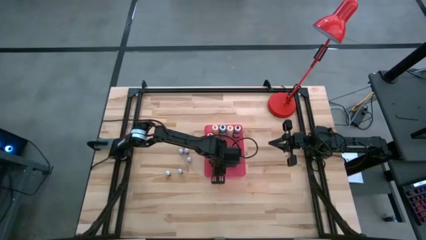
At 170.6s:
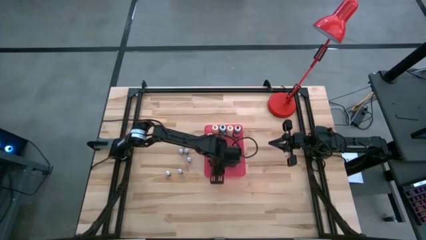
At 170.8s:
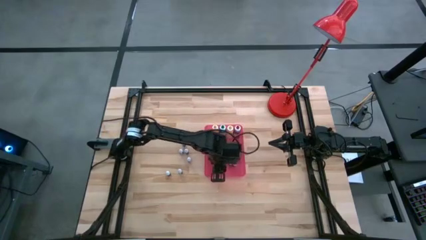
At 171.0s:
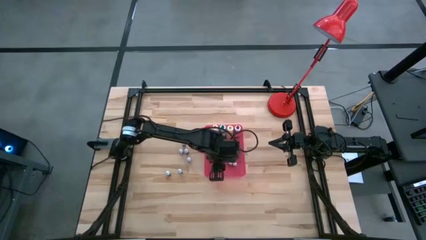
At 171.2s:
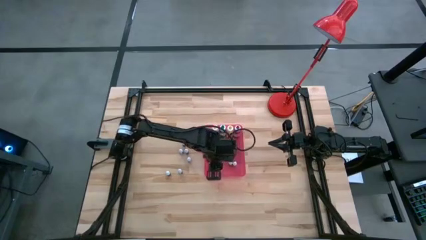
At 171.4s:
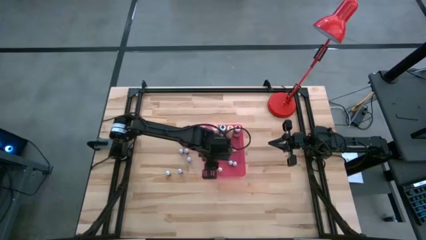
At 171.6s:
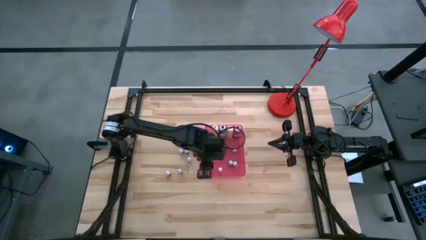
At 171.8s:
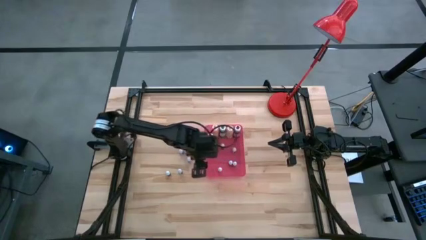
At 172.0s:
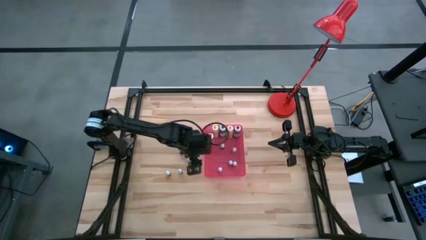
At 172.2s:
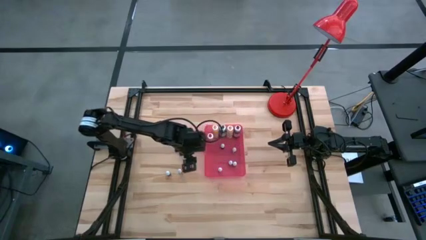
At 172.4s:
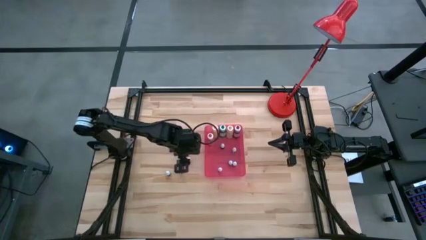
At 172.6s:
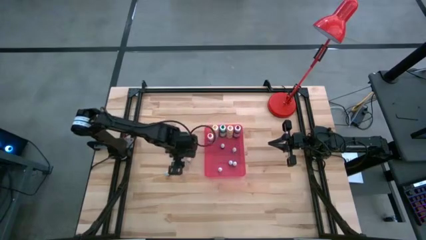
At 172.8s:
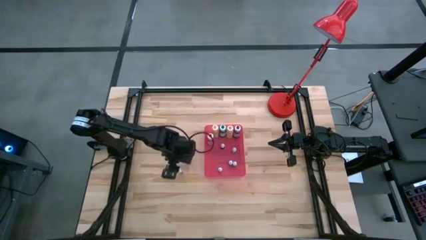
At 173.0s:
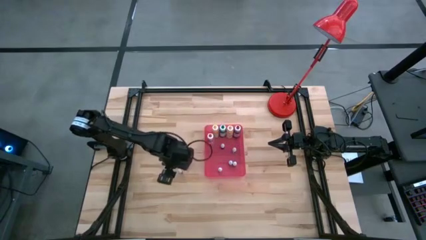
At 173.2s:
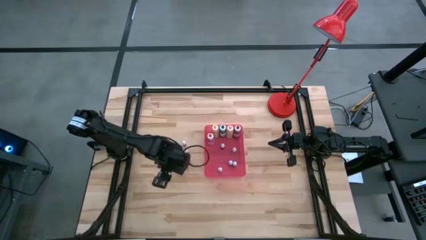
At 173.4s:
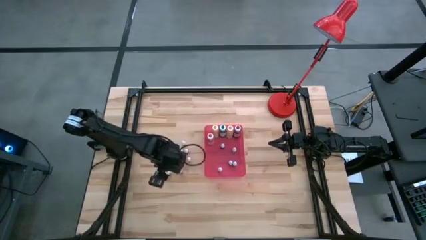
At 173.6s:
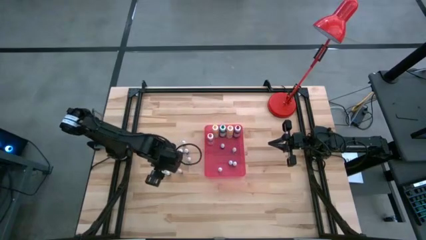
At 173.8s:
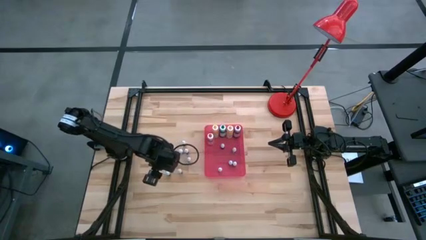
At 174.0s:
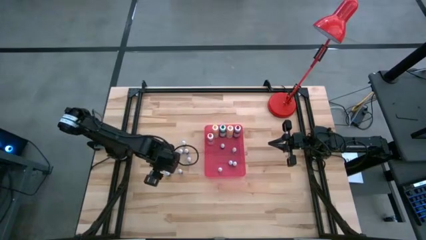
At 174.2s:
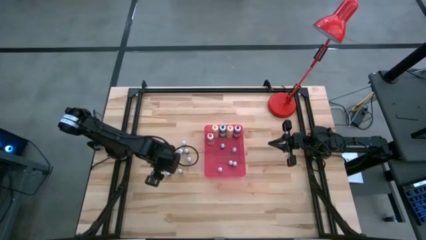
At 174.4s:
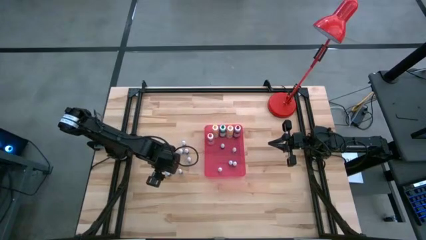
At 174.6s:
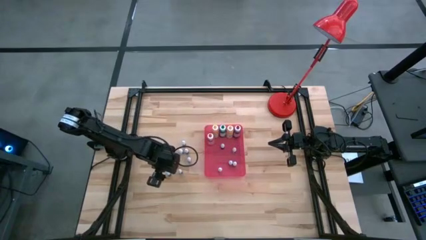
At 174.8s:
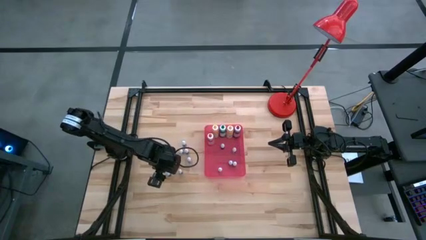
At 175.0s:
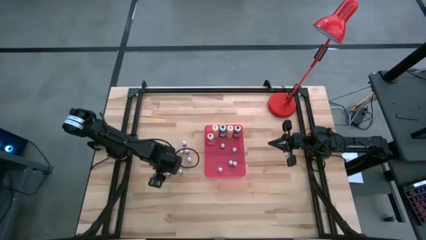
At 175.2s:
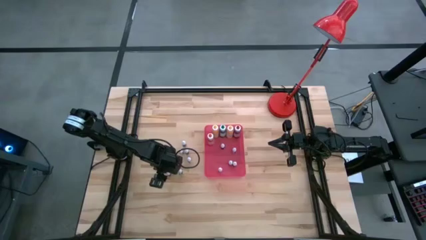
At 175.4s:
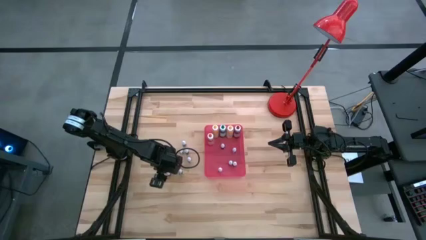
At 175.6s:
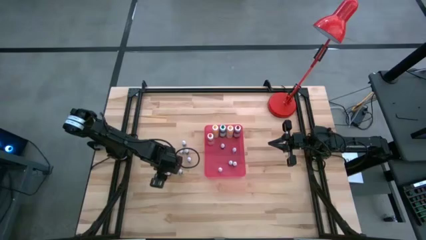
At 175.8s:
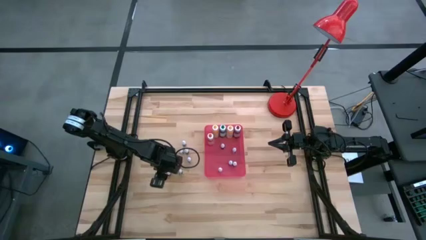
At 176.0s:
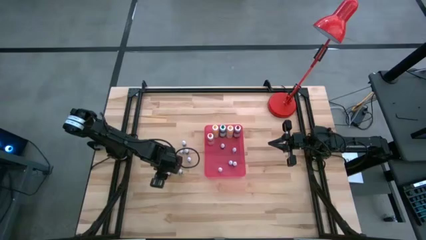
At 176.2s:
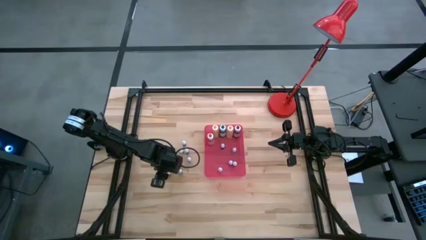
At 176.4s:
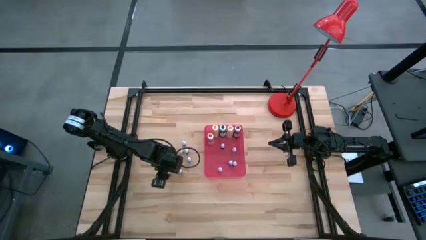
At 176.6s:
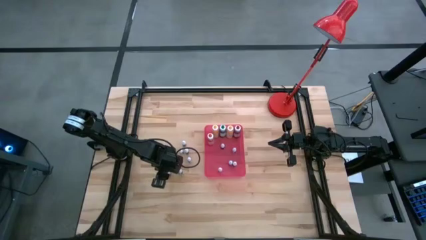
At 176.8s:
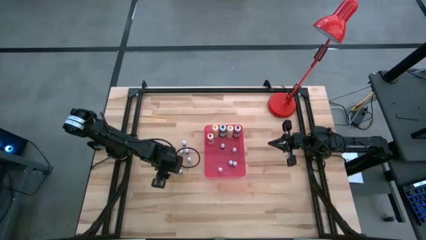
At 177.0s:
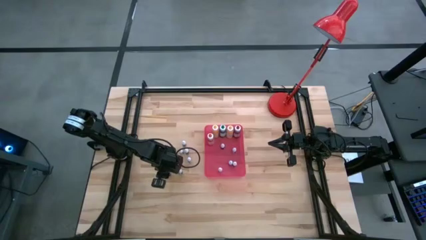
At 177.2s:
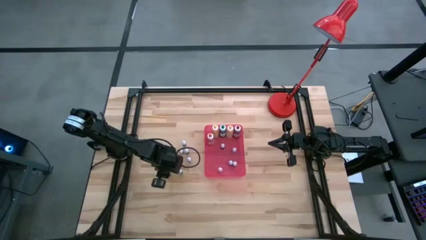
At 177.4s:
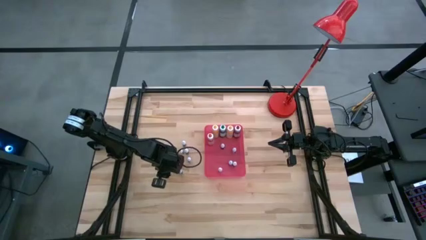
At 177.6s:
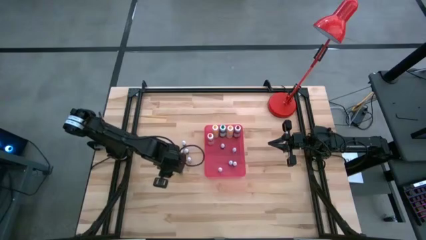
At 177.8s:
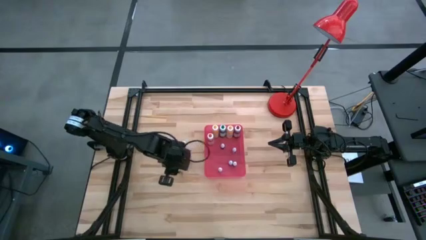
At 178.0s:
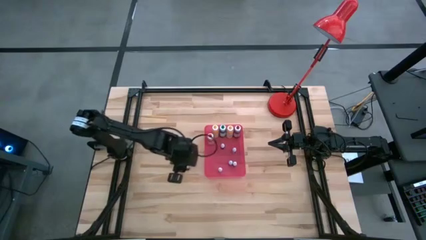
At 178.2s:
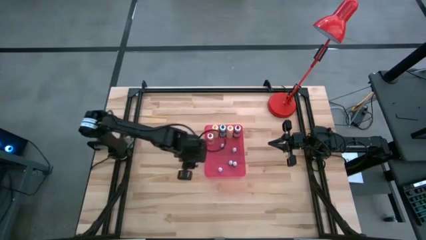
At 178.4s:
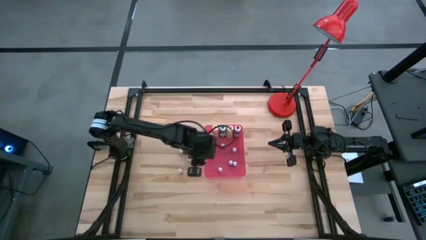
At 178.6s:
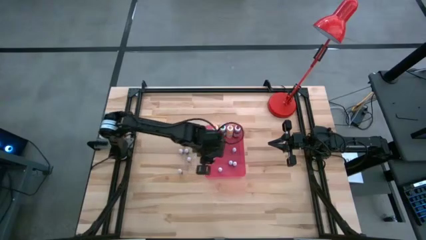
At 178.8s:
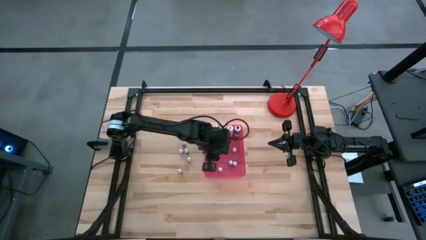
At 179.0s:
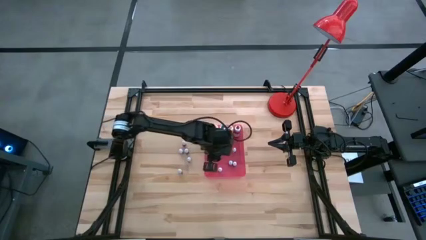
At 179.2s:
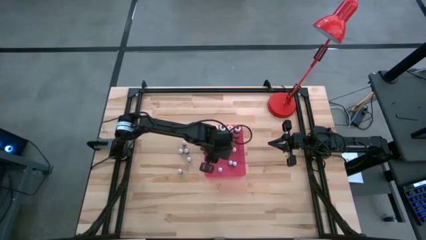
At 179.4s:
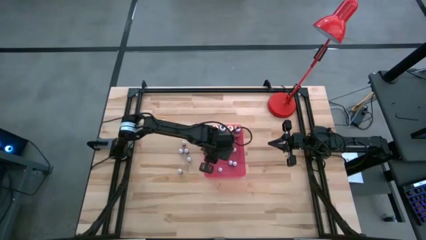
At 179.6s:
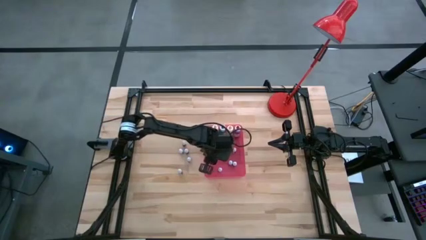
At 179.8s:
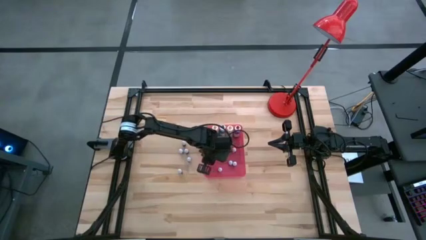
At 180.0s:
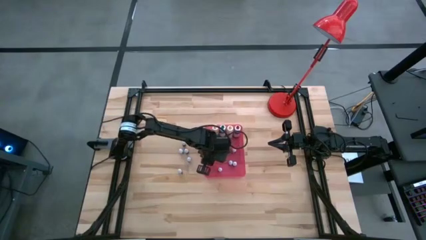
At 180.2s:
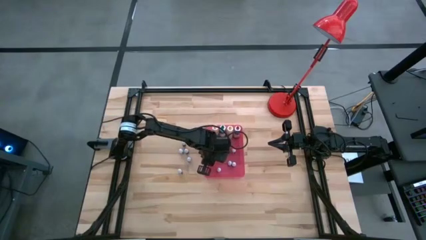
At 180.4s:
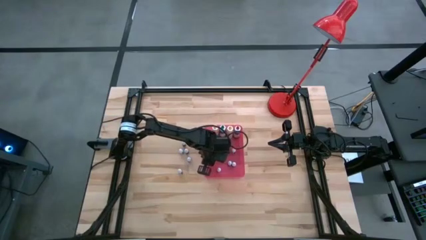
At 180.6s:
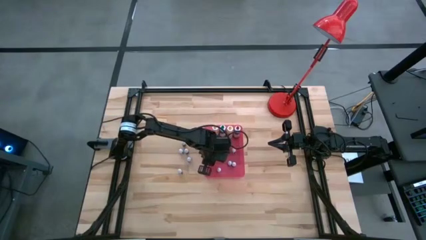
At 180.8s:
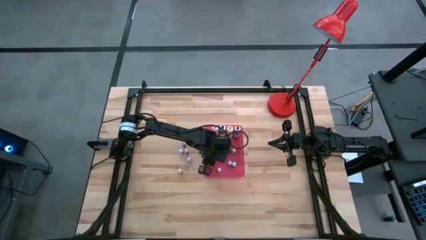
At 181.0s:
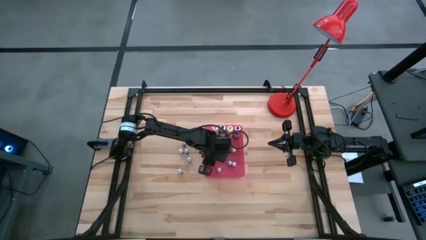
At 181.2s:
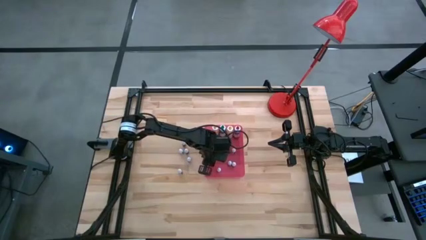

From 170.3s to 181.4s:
Task: Pick & Place food coloring
Put the small food coloring bottle into the red bin

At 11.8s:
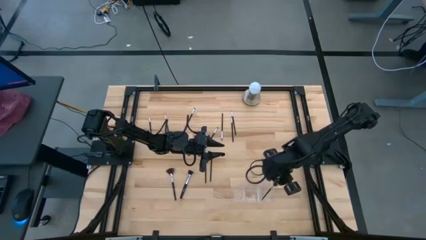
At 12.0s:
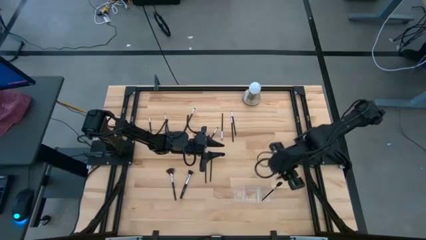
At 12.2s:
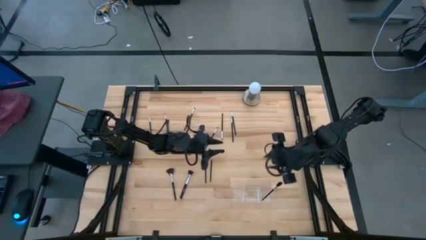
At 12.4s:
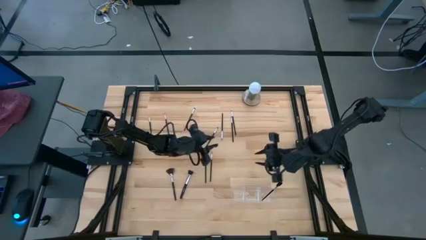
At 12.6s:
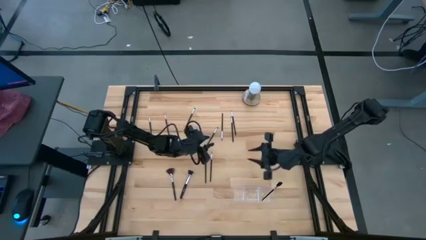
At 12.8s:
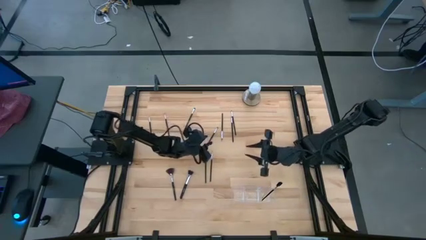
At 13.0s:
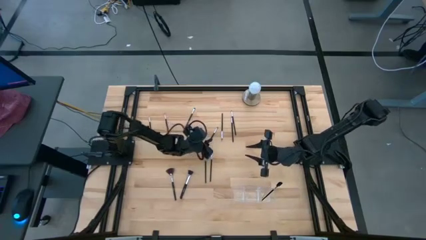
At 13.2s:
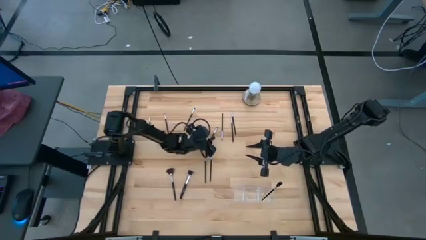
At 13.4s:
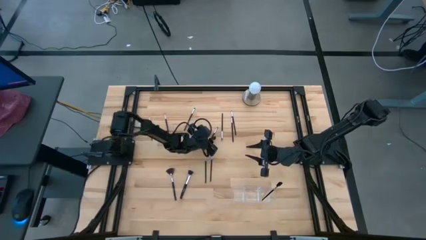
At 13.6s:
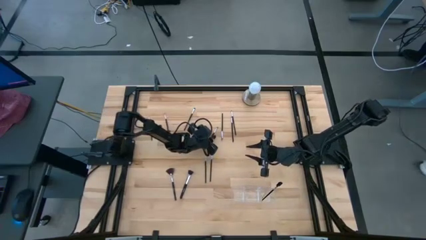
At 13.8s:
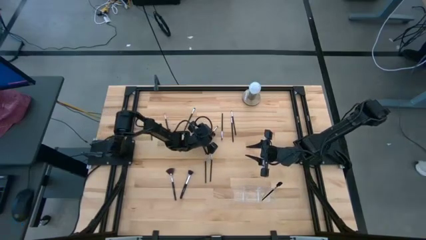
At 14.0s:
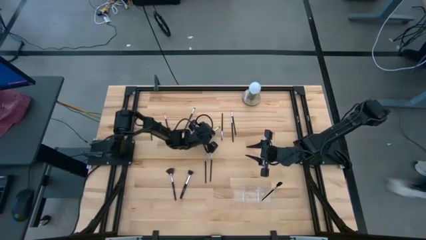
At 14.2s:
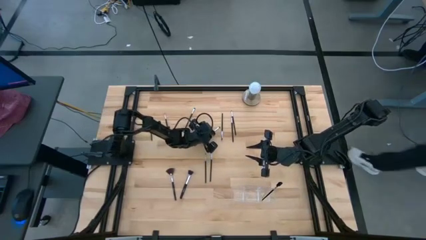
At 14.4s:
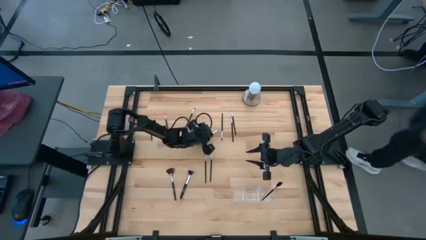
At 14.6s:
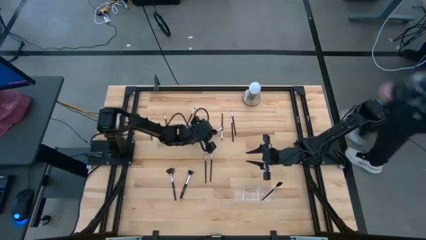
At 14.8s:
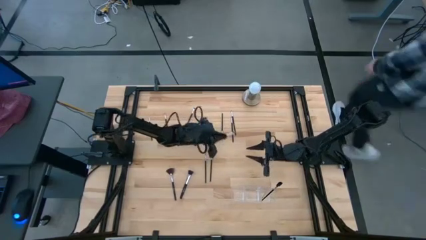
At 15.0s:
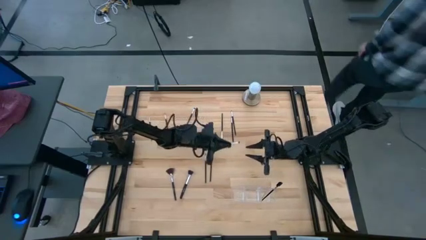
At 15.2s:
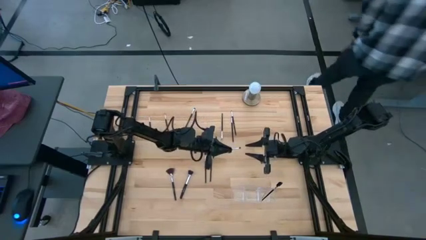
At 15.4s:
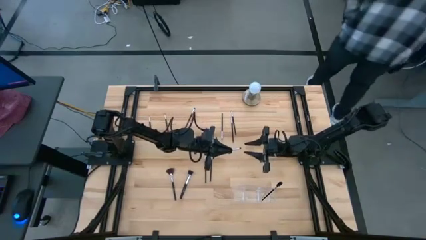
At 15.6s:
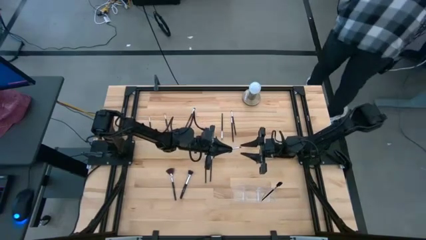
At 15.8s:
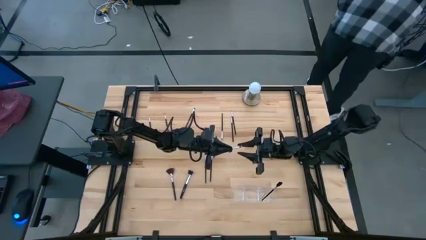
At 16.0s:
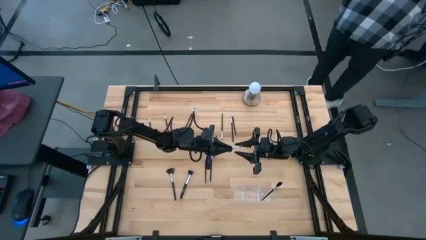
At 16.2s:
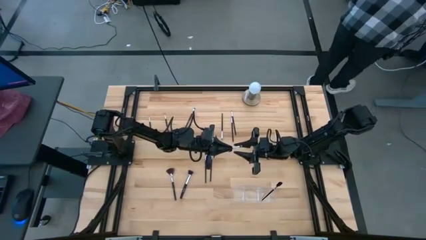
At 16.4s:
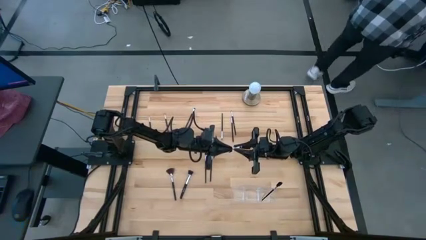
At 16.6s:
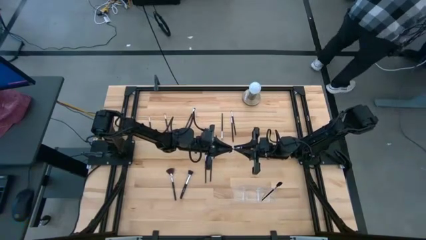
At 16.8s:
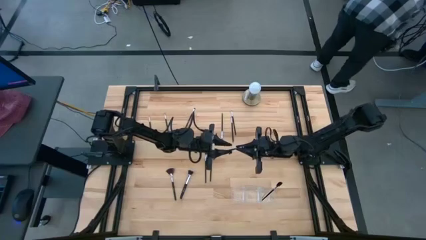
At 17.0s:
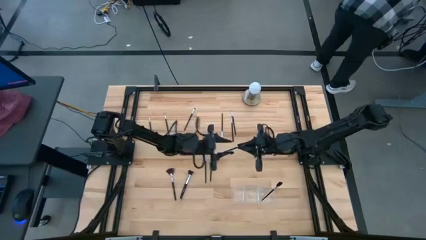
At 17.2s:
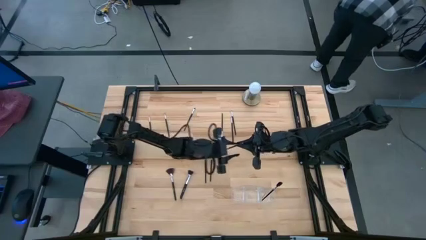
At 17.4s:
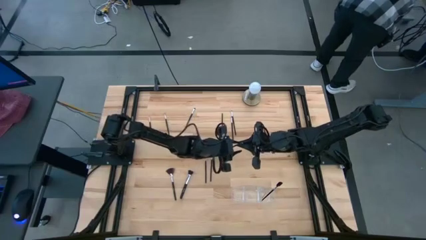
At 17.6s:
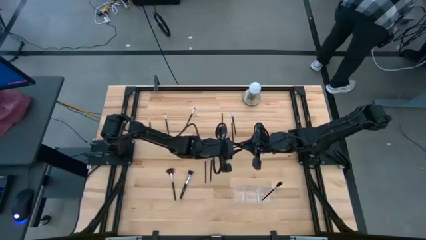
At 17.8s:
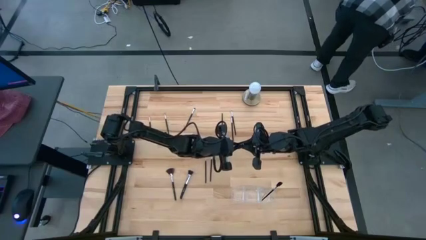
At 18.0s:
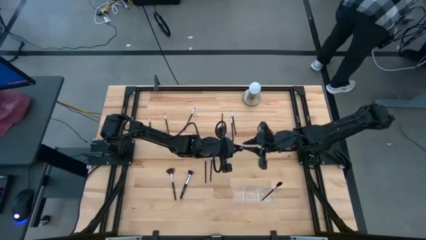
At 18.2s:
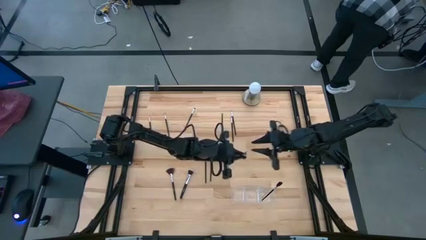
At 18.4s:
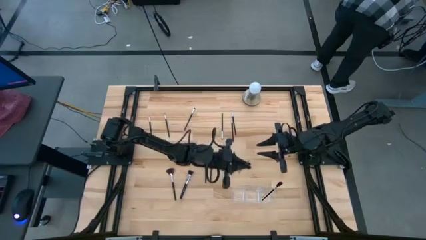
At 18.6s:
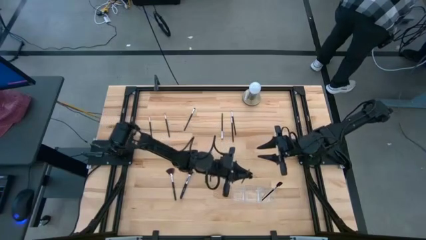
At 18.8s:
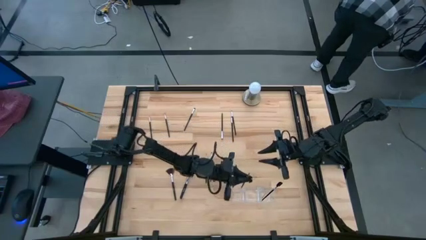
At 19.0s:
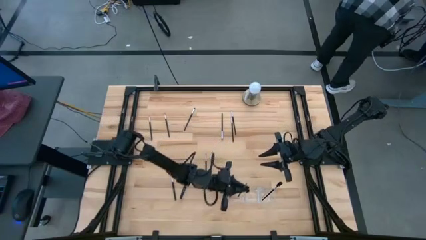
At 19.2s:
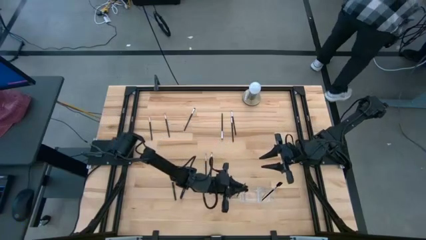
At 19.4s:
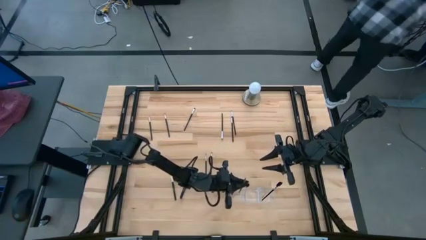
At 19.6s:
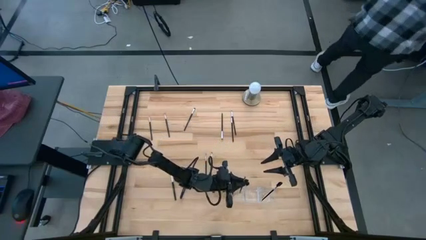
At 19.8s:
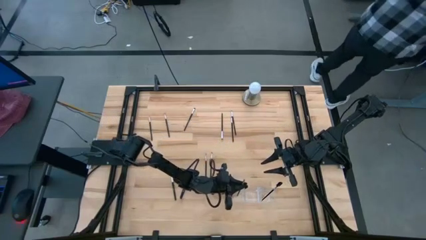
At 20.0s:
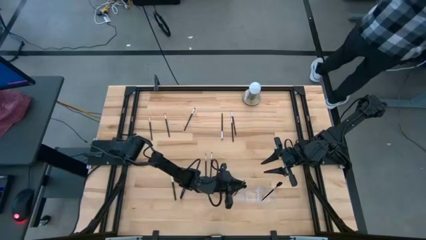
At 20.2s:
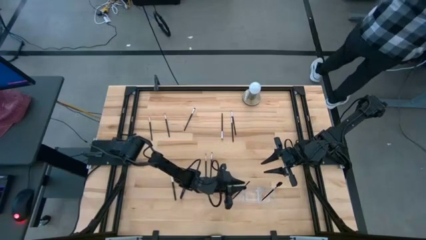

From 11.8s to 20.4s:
Task: Put items in baskets/containers
Put the eyeshadow brush into the left section of the transparent organizer
